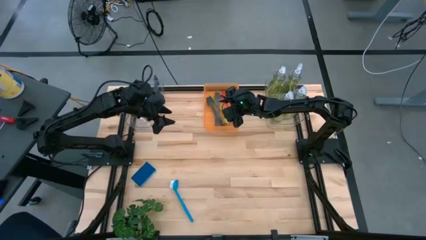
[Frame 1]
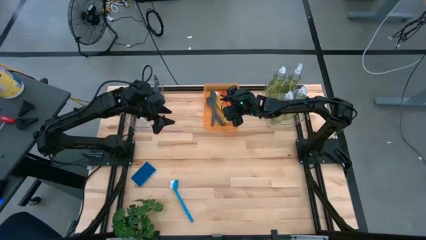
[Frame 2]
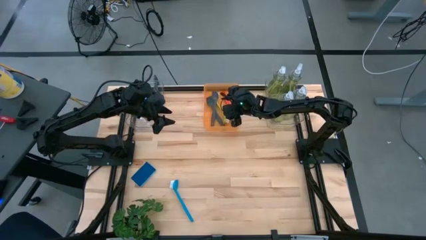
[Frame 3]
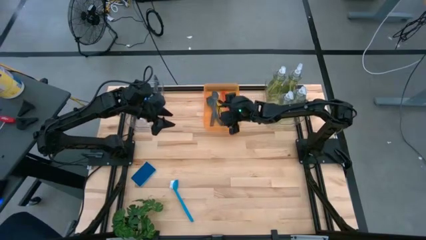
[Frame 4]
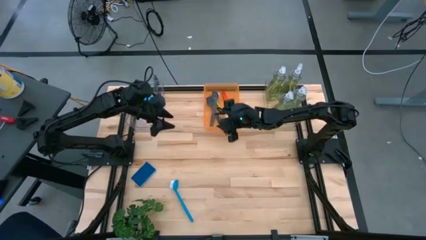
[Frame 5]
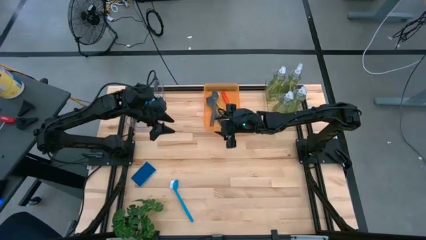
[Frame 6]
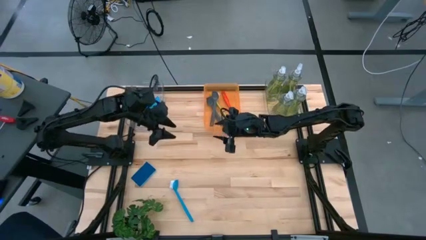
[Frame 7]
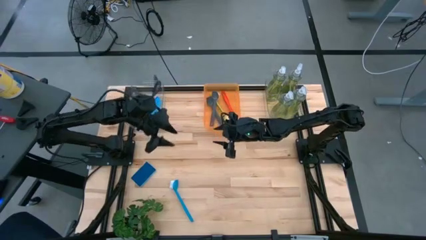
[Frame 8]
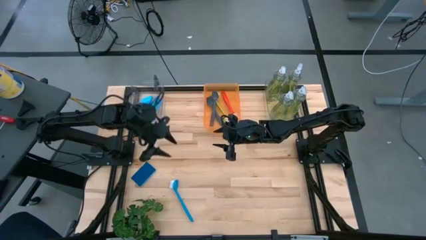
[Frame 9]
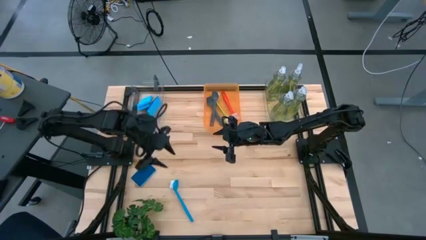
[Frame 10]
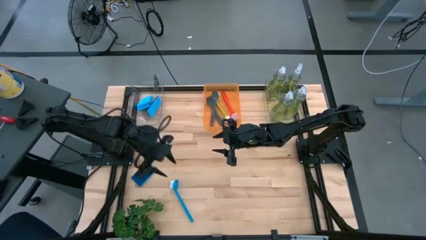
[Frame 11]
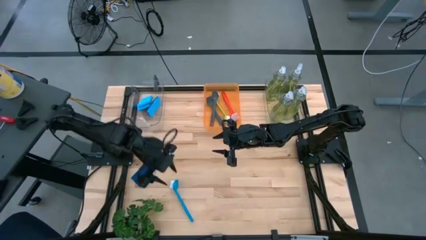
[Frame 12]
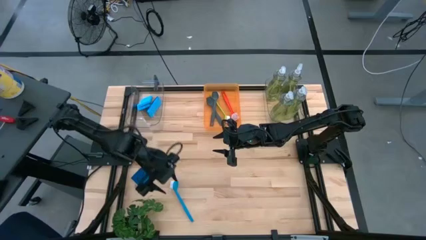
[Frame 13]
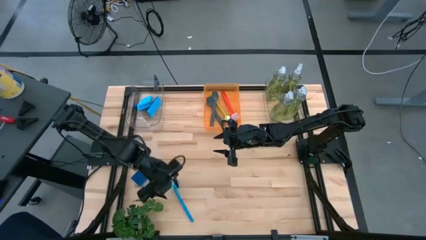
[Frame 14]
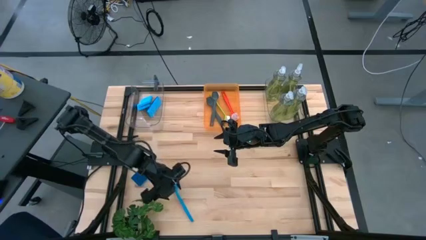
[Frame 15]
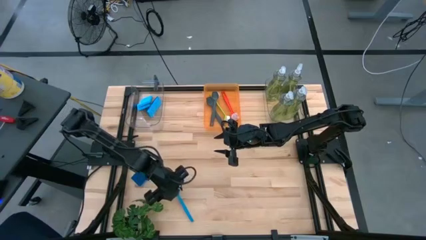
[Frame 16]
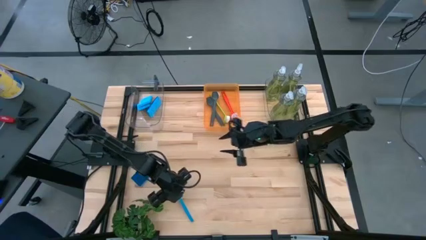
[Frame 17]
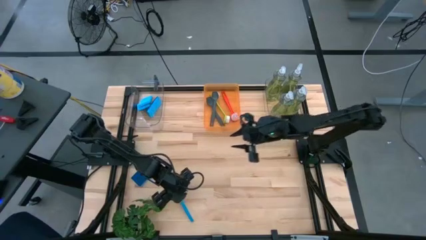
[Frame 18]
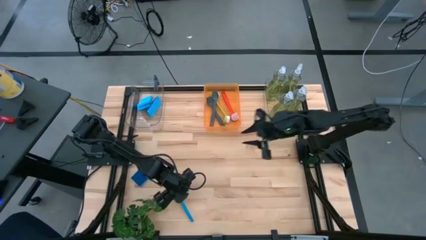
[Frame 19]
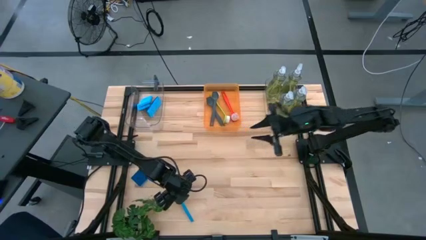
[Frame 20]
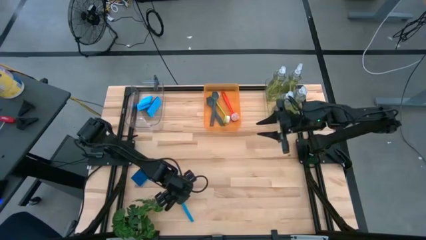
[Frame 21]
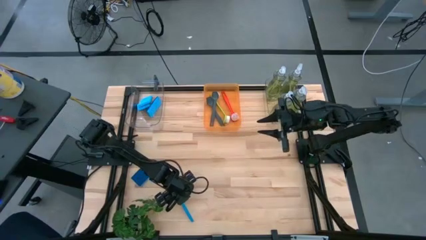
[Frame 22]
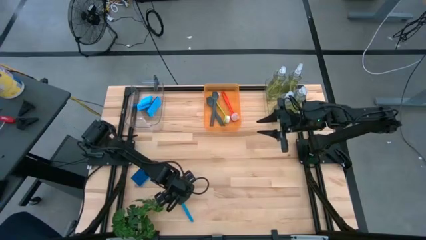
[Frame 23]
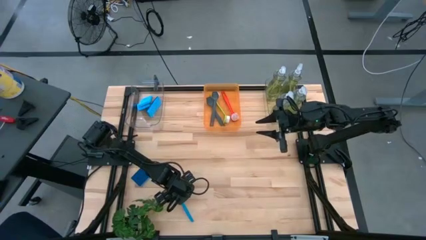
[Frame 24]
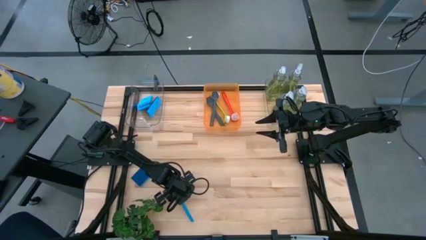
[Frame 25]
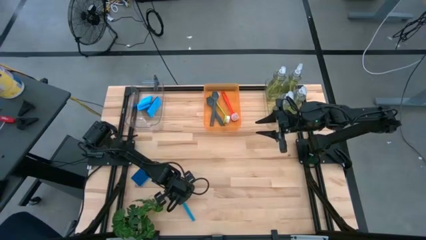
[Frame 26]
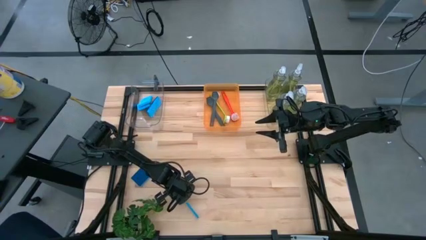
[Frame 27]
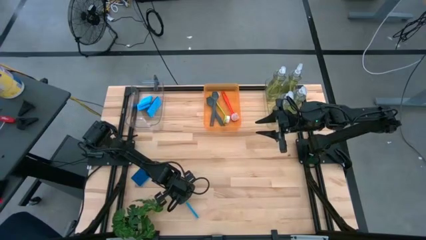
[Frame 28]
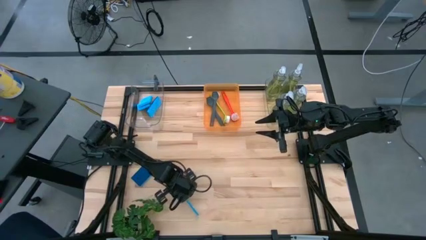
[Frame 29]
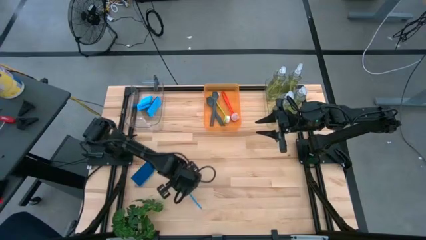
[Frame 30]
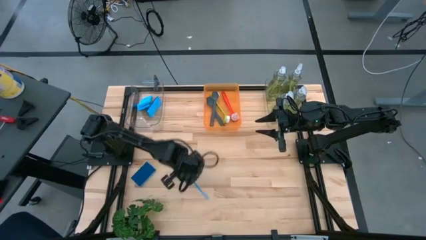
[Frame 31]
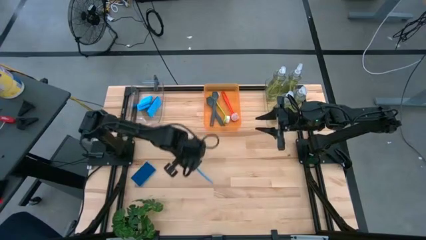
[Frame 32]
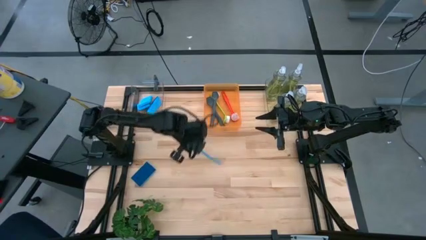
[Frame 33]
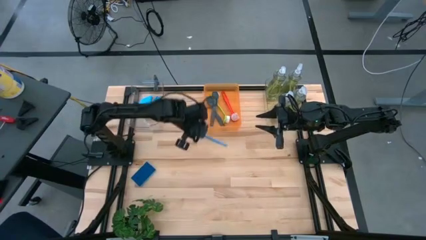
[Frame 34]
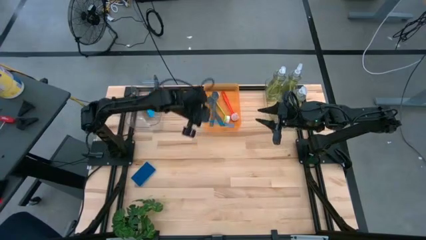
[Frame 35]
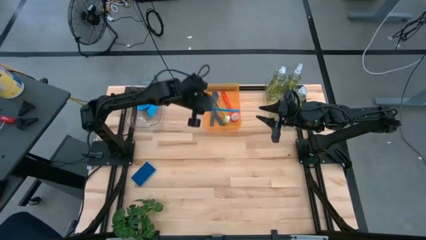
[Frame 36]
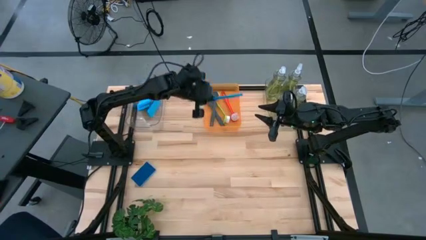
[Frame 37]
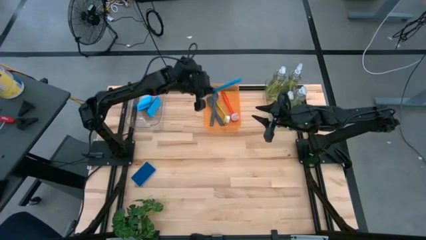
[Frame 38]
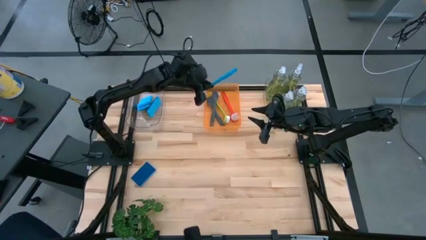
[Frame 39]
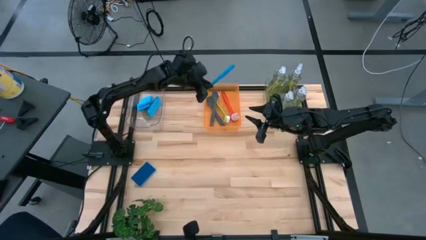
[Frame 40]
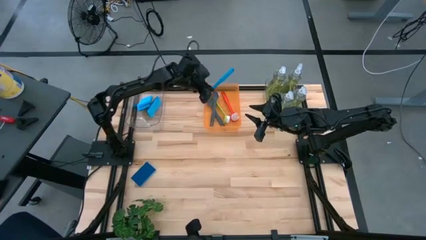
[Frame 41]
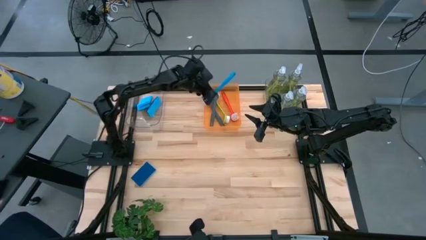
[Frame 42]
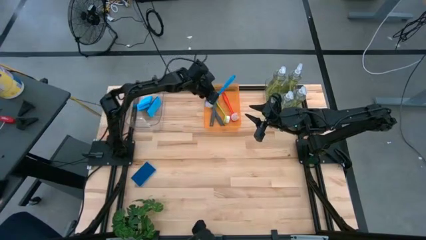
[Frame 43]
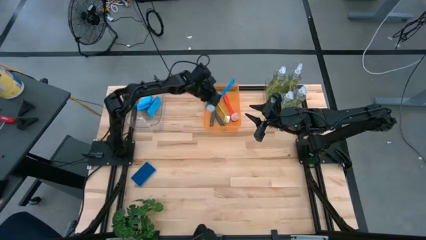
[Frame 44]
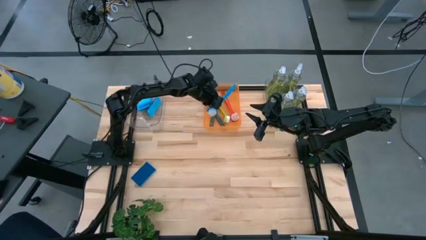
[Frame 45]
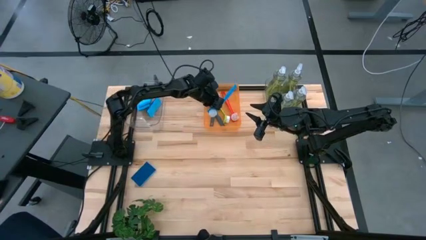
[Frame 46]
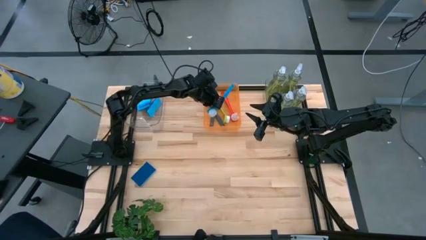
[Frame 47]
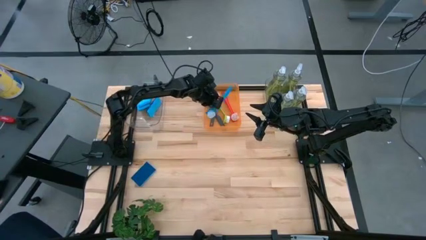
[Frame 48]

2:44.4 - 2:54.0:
Task: Pick & Place Kitchen Sink Supplies
Put the blue dish brush into the orange bin

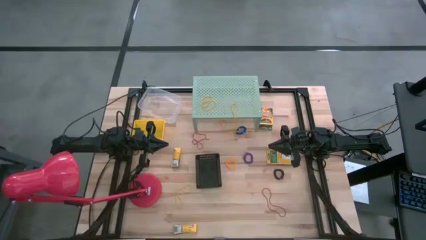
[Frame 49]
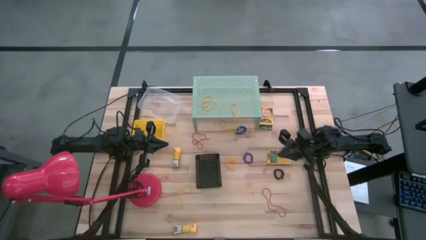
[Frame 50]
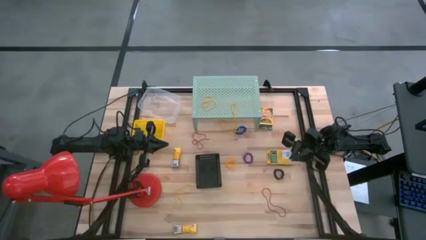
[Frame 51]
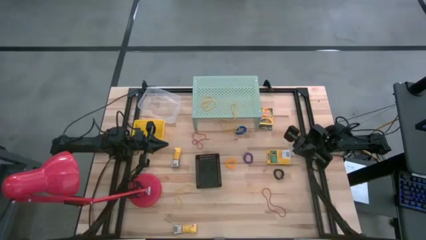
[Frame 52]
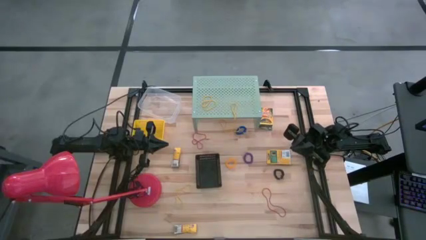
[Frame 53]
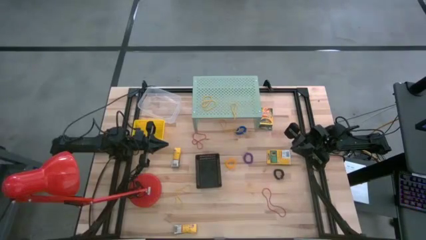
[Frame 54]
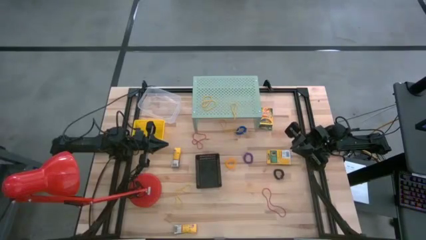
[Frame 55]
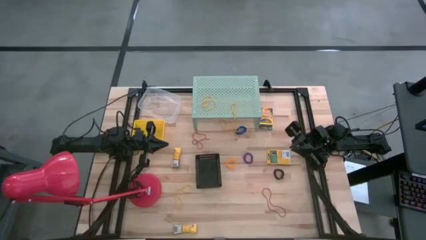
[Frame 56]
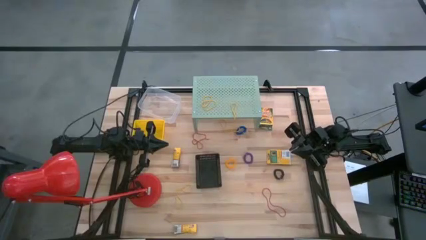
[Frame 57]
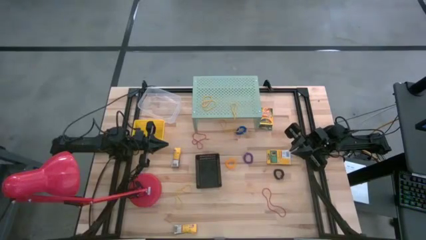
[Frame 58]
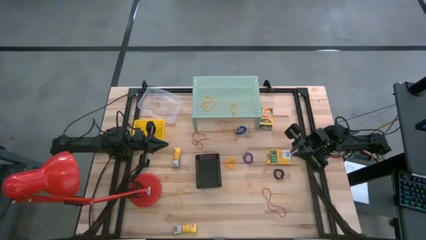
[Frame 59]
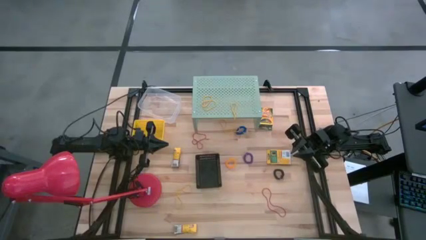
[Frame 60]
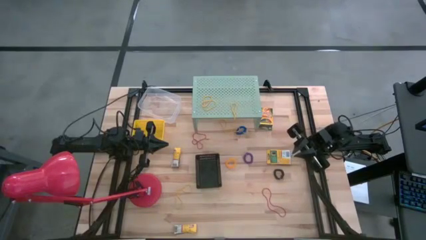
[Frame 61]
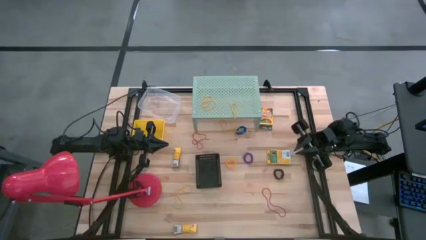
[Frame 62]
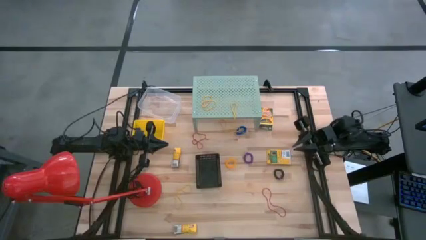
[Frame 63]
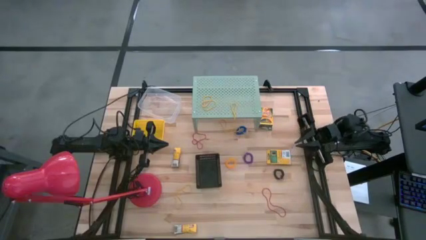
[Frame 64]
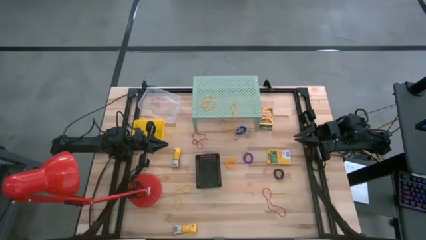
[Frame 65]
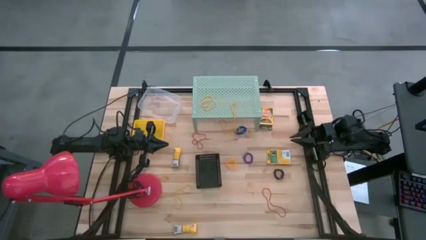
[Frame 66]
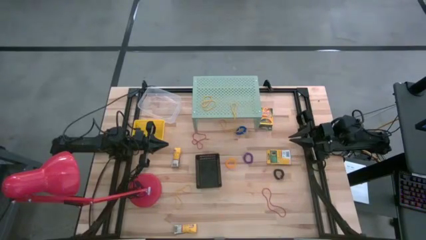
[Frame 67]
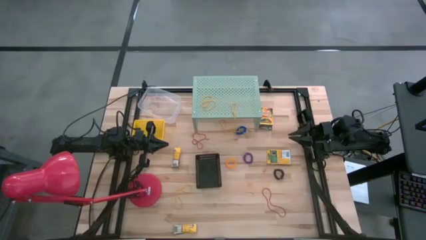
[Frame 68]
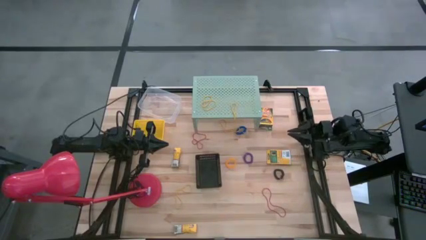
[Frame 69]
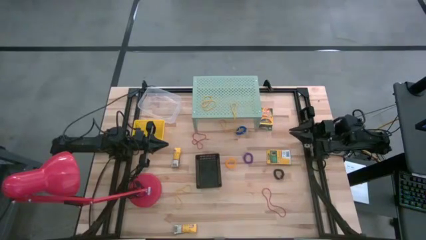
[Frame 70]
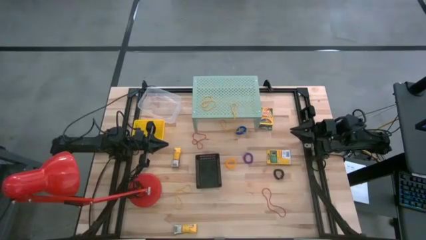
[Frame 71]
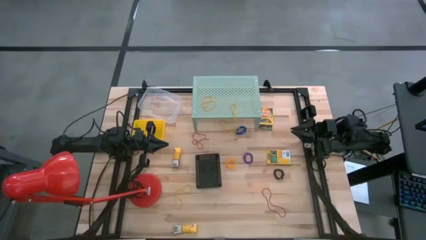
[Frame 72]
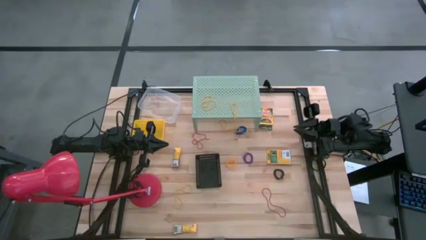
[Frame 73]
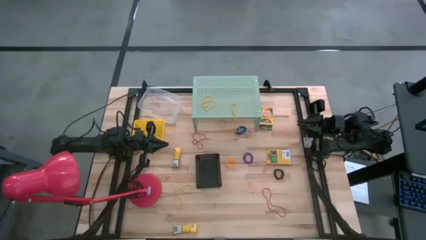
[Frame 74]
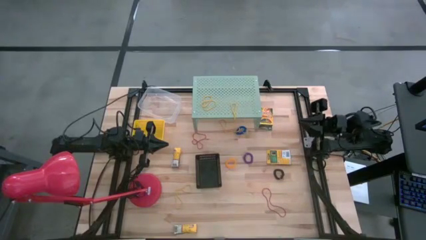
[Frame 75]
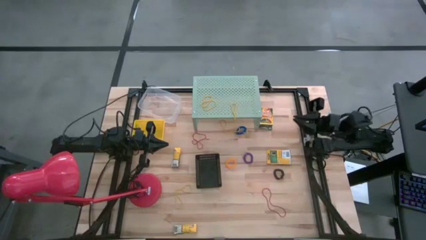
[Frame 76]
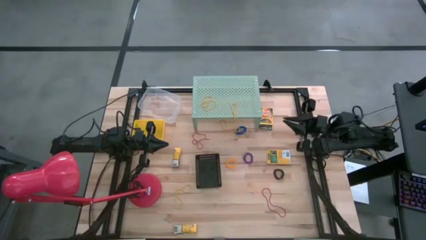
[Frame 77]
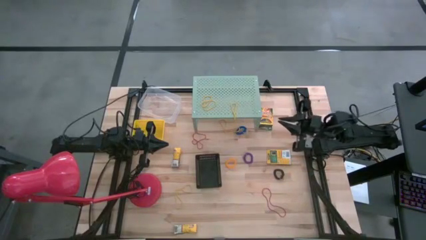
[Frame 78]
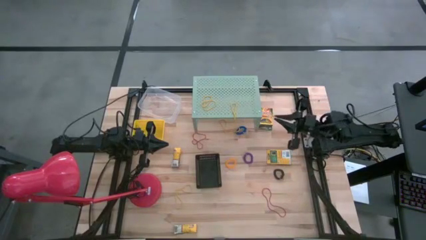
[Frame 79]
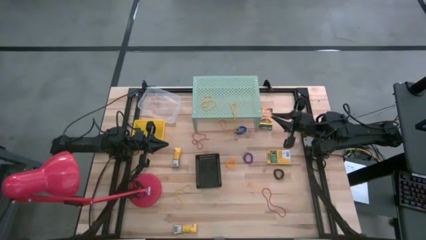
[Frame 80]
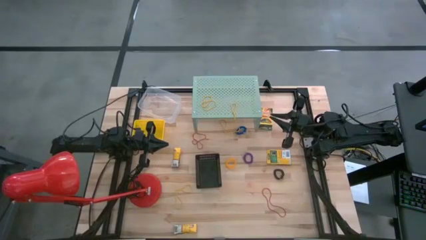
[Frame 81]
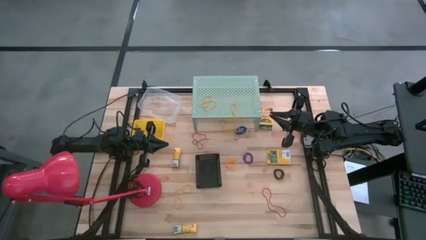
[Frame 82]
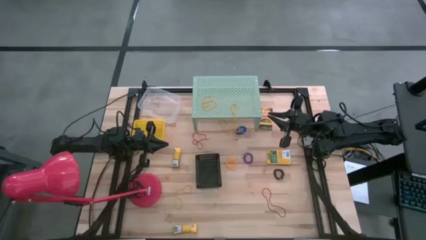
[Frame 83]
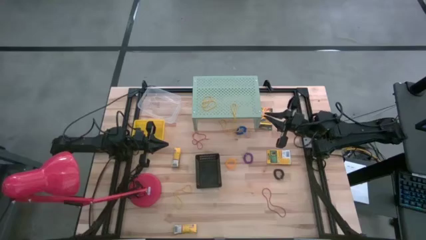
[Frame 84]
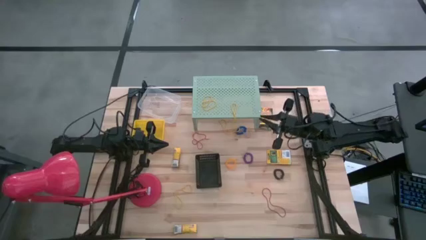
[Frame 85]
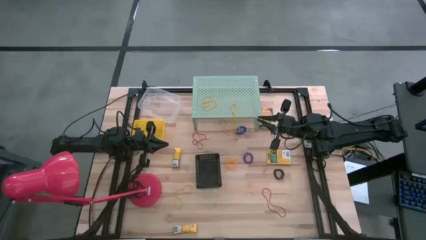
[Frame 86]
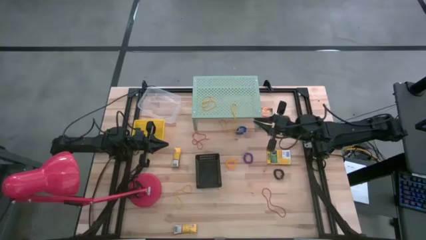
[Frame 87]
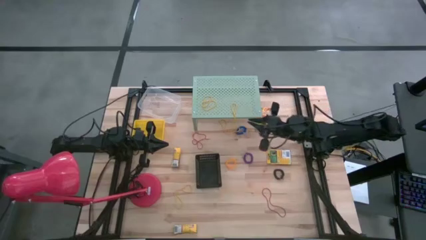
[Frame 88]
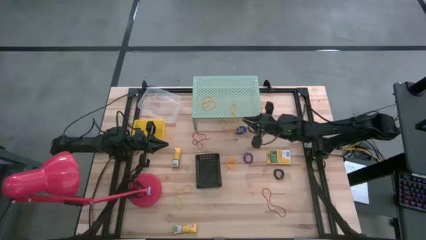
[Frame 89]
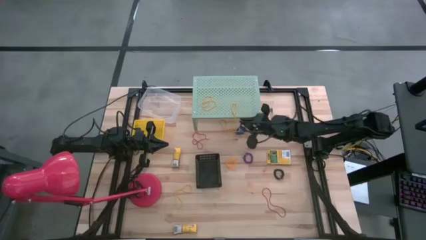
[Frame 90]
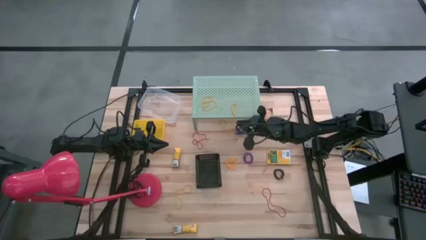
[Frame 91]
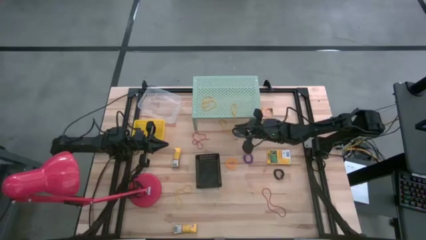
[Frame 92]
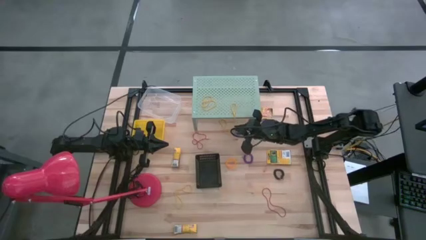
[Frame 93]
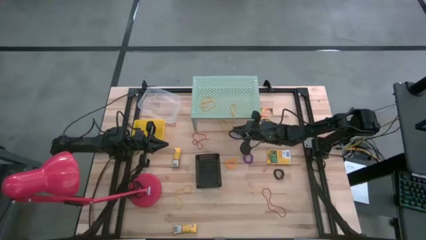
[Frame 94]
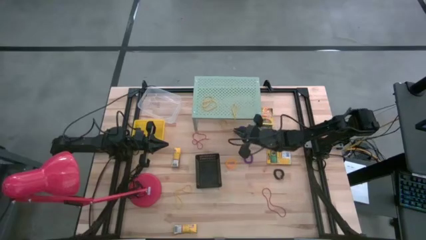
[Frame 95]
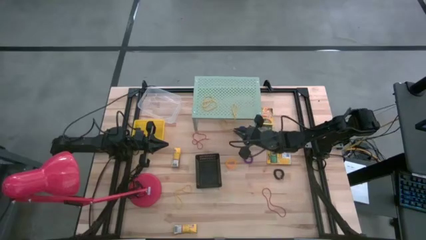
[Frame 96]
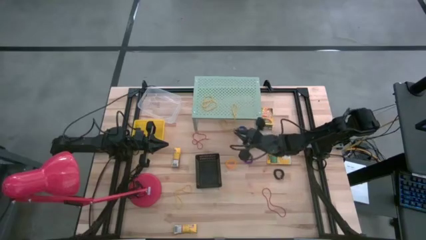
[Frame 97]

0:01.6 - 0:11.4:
Task: Pick & Place Office Desk Supplies
Put the yellow rubber band from the shelf into the black bin
